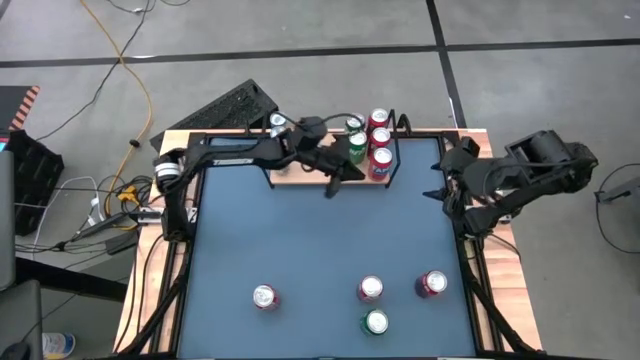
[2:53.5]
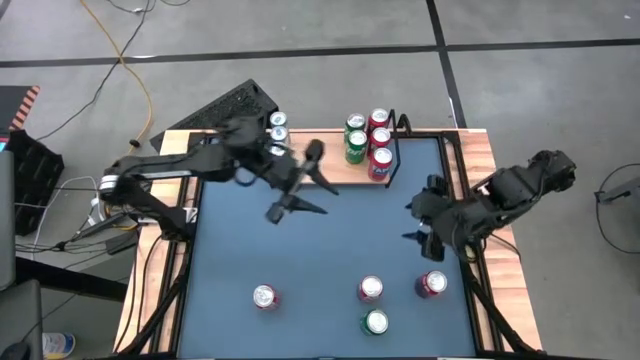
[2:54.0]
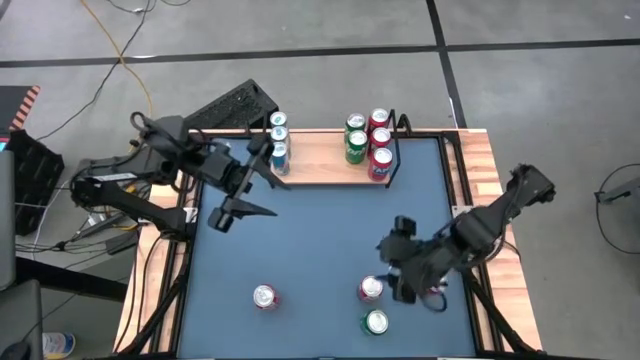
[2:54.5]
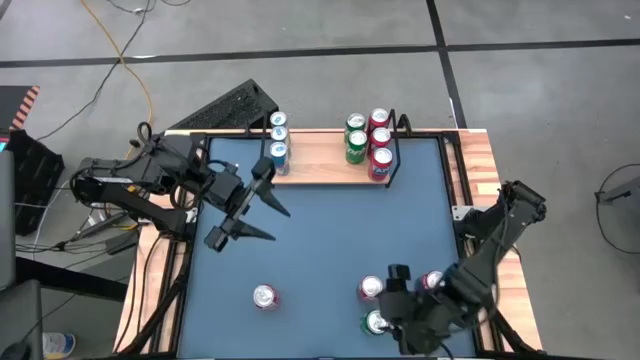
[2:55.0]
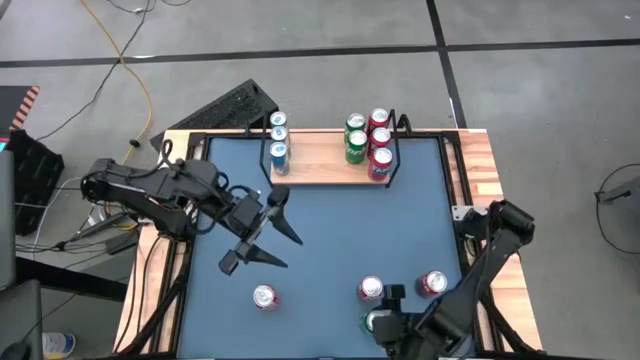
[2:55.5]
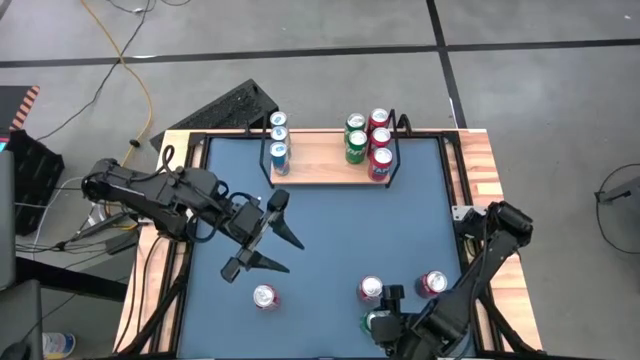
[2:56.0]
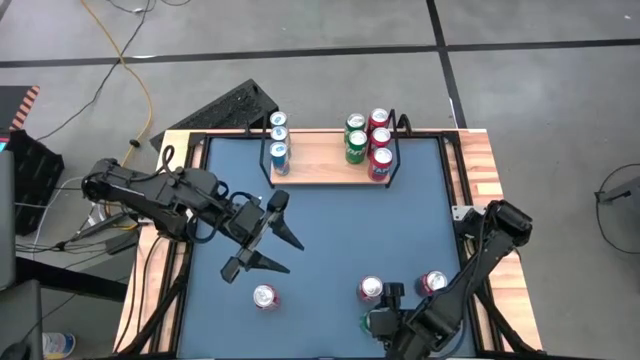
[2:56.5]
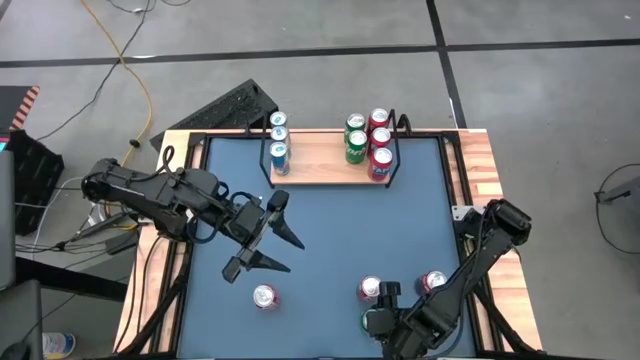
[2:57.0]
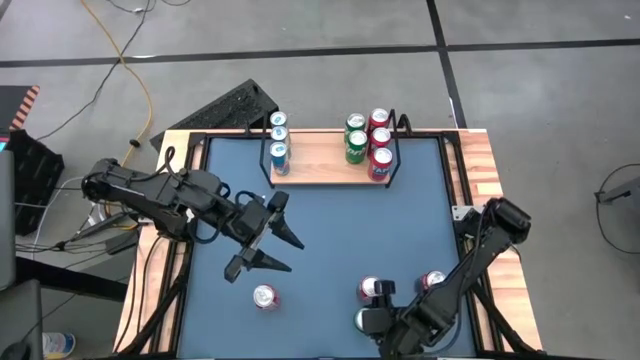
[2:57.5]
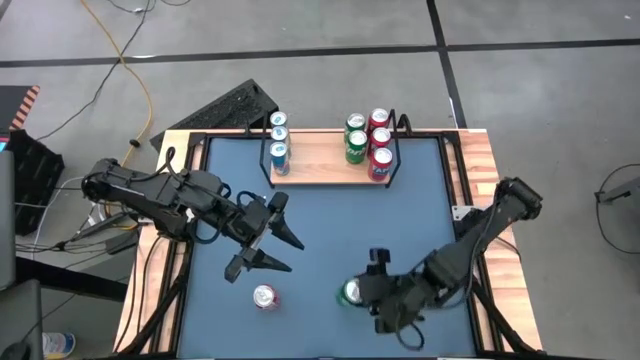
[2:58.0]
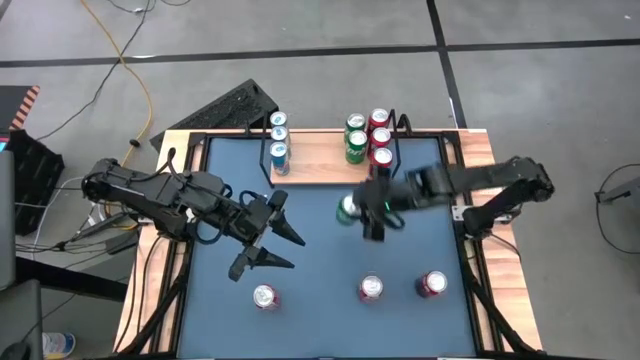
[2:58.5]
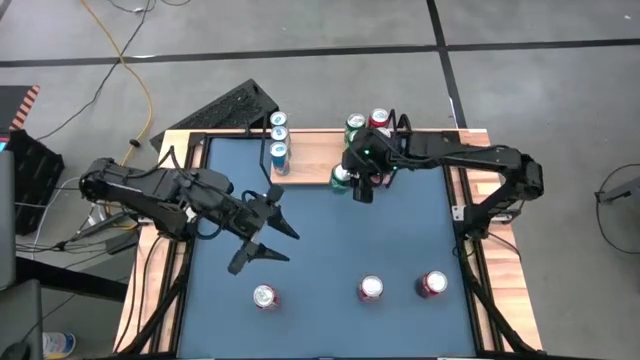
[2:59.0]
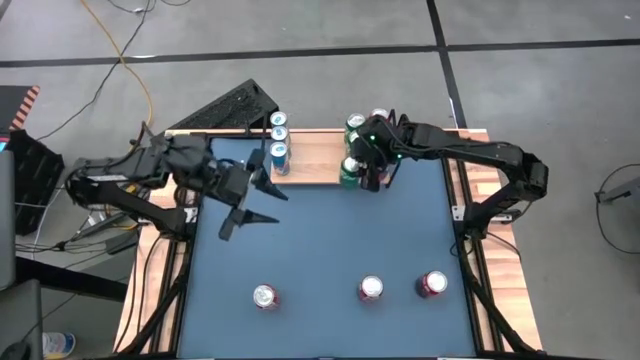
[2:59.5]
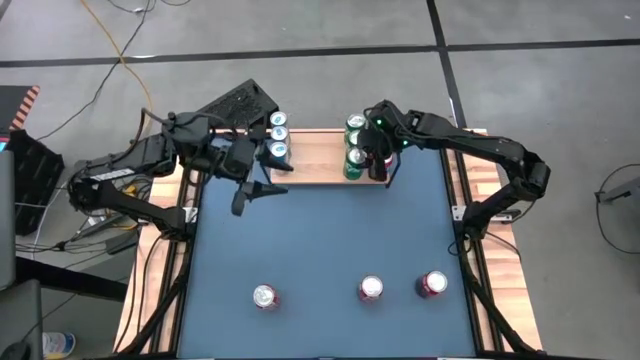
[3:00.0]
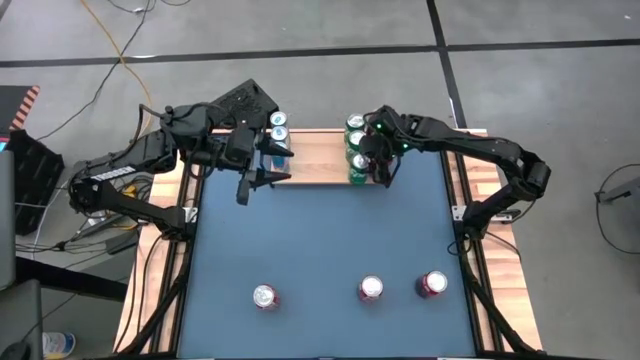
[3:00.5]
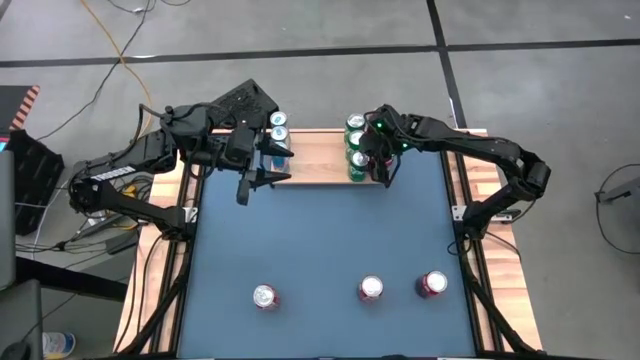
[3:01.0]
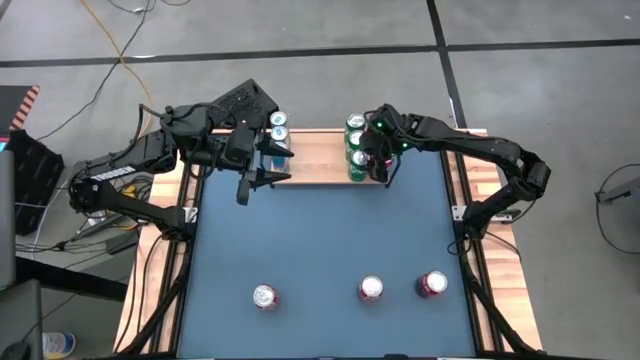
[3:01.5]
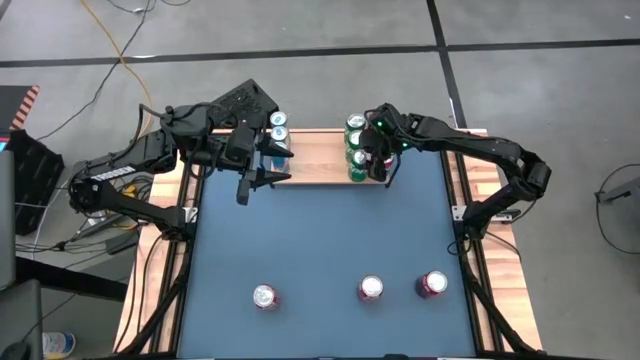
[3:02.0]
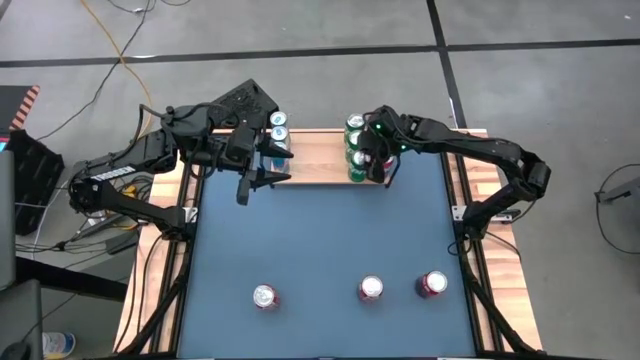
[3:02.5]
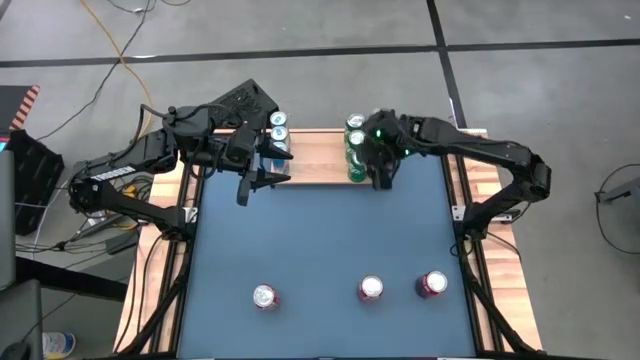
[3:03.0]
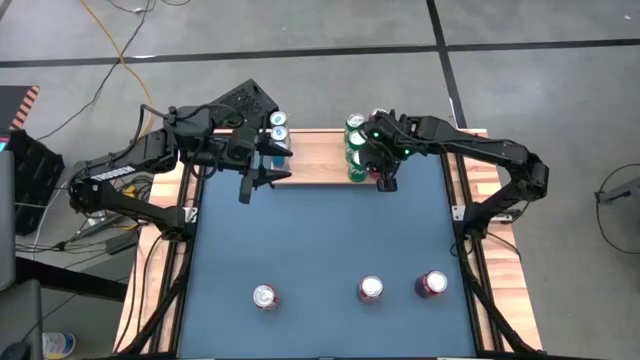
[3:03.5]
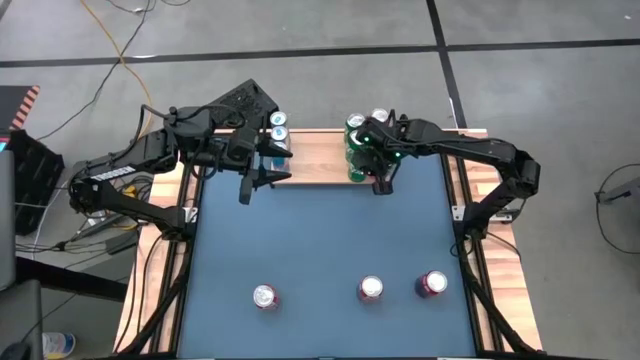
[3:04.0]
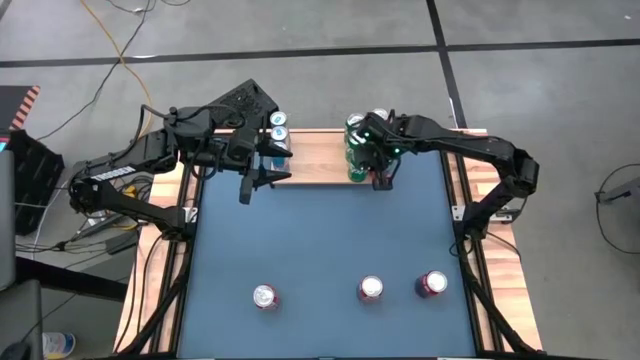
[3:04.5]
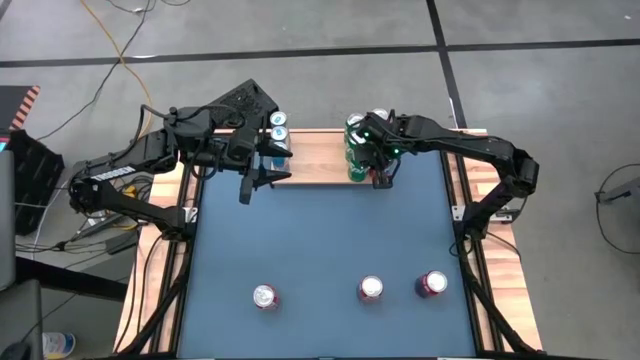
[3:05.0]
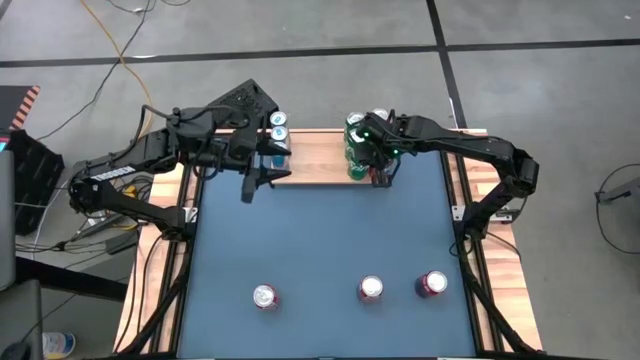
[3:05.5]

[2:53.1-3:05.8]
Task: Place canned beverage on shelf
Put the green soda can on the shelf aligned with the other green soda cans

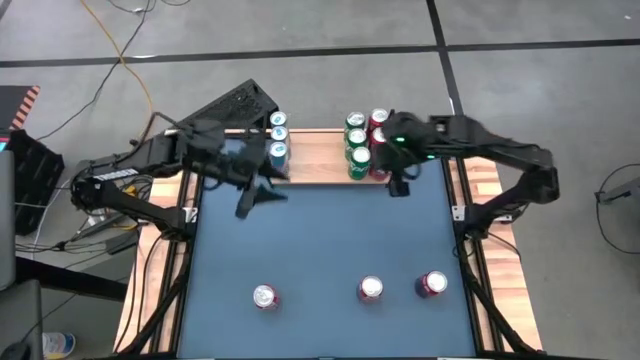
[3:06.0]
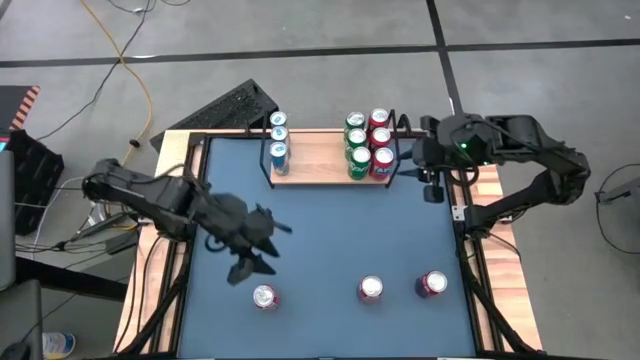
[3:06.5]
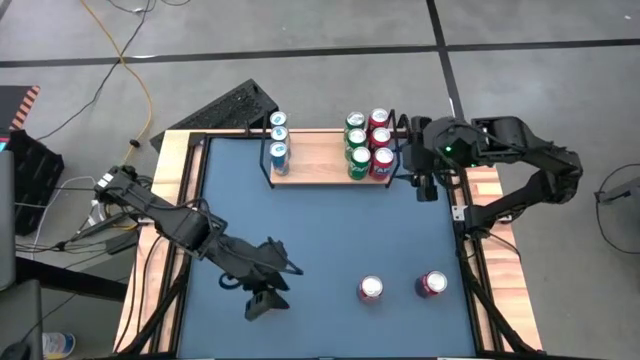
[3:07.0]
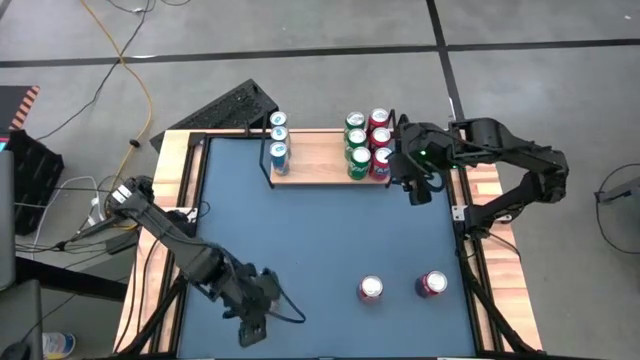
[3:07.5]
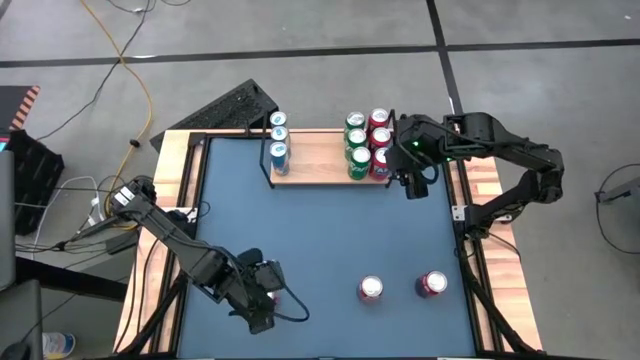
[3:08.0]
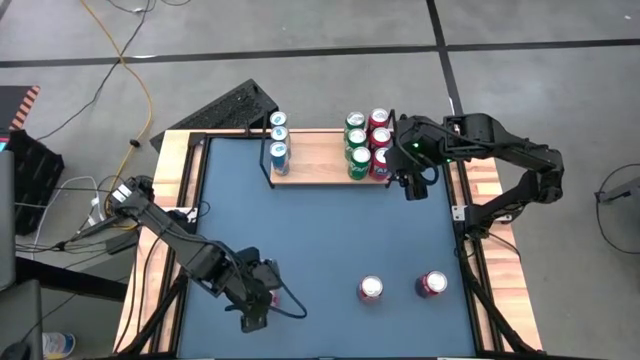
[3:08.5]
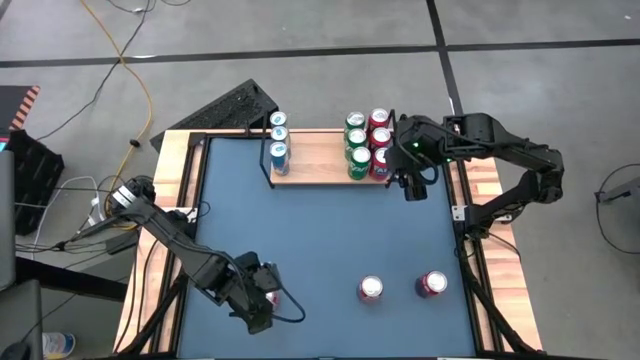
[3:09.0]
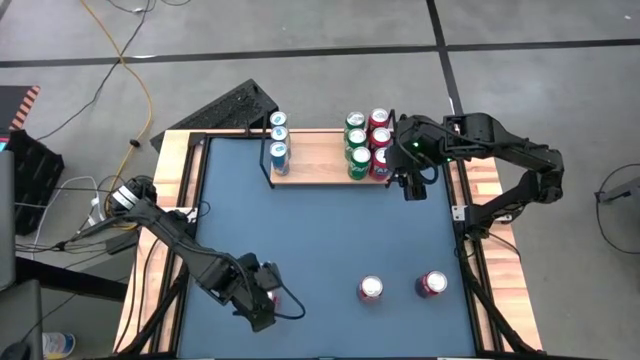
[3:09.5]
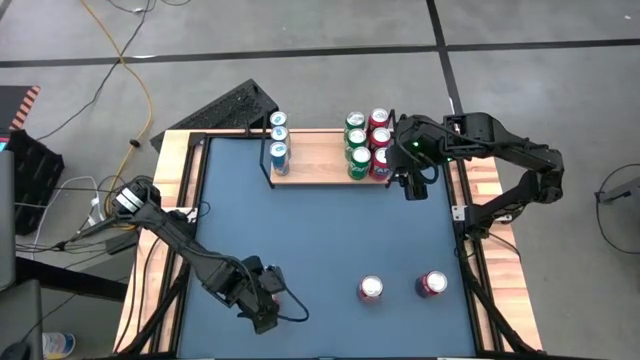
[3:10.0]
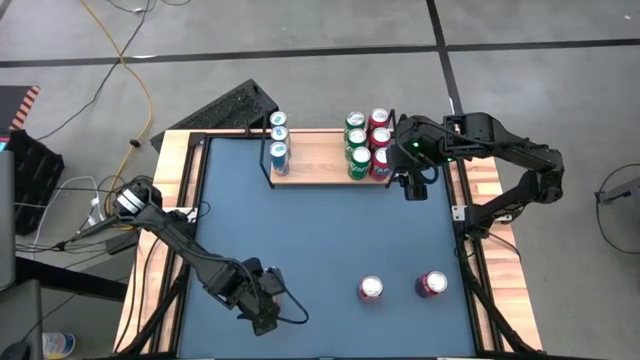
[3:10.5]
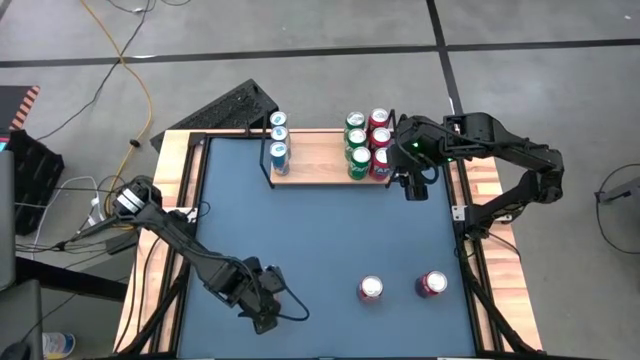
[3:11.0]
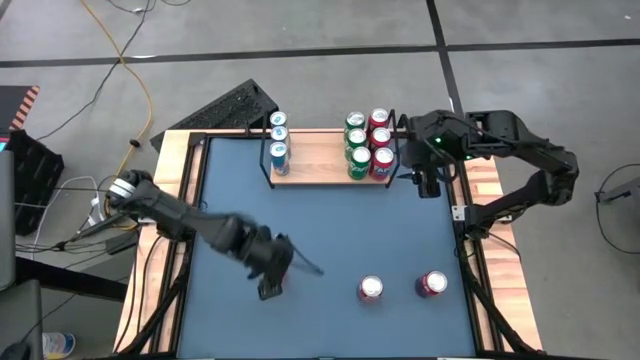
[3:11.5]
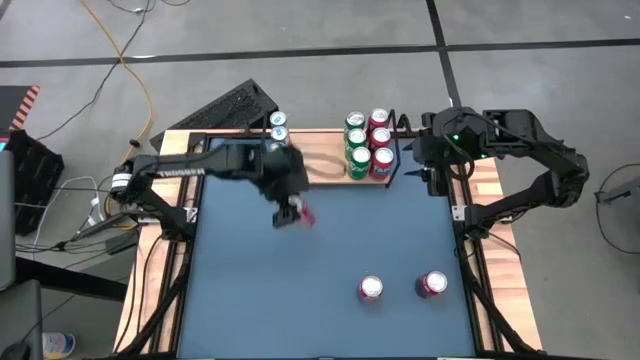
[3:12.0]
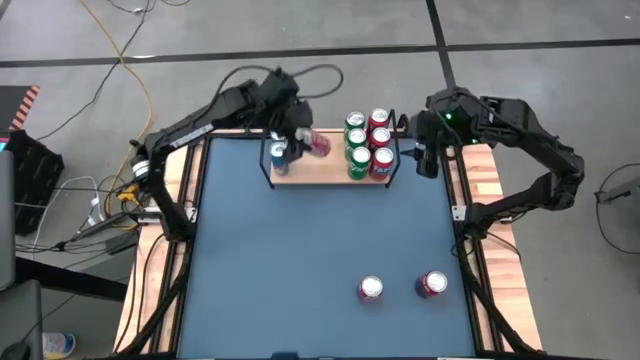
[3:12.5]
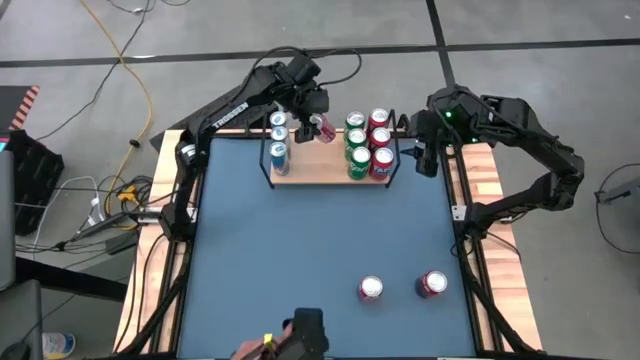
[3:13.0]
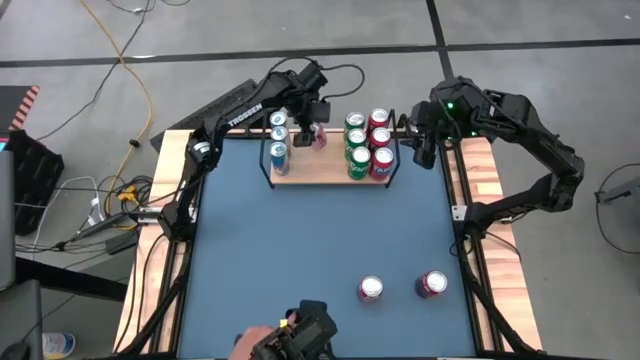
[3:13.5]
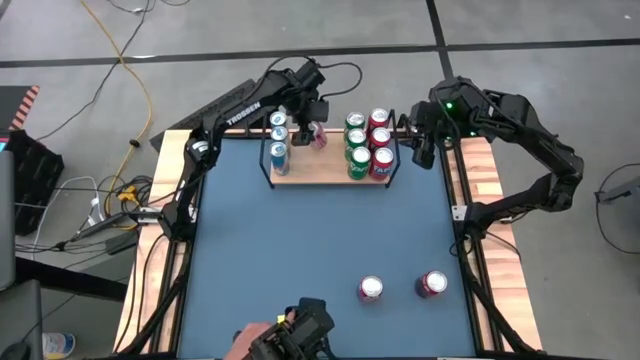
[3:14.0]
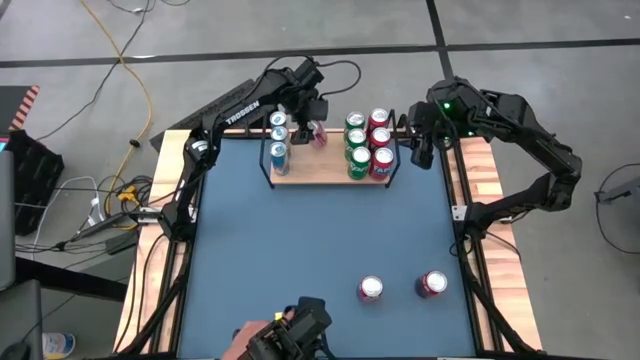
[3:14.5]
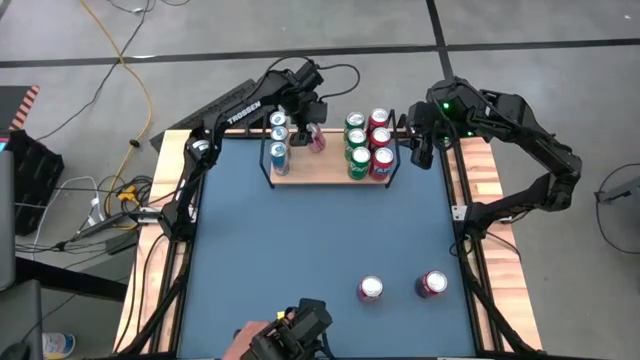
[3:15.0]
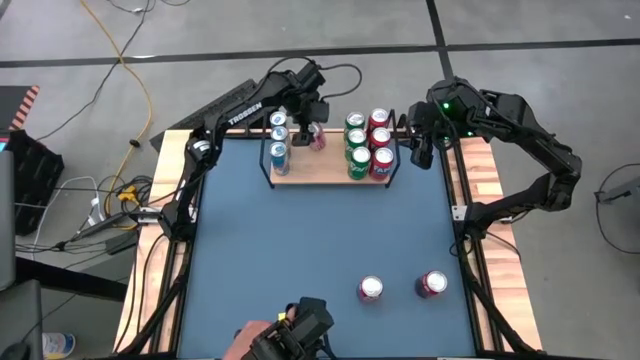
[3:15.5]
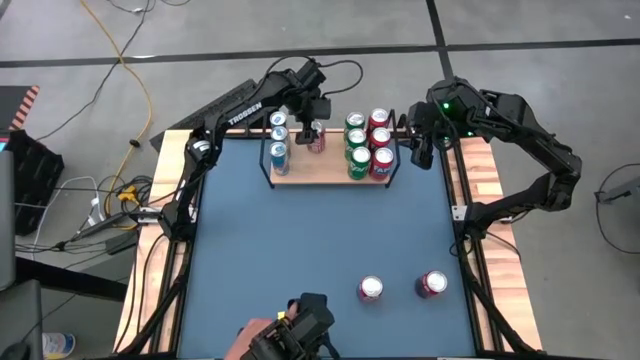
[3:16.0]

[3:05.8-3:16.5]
Put the left red white soda can on the shelf
